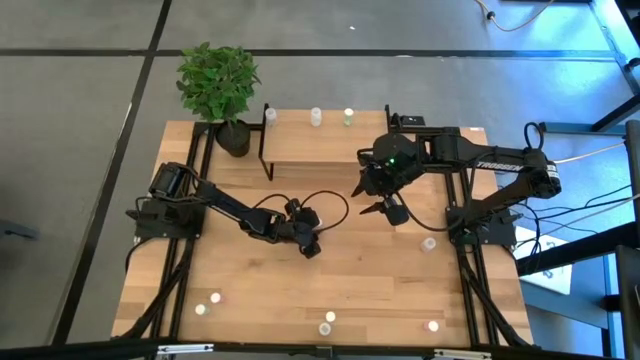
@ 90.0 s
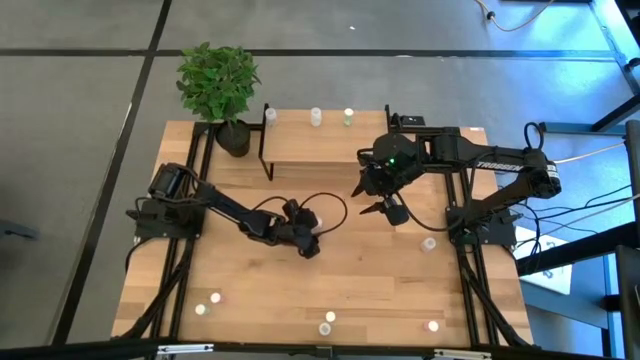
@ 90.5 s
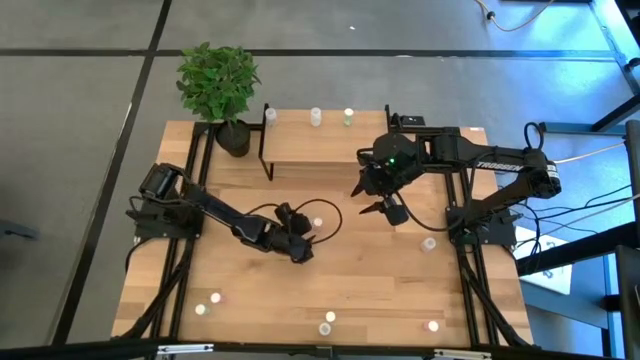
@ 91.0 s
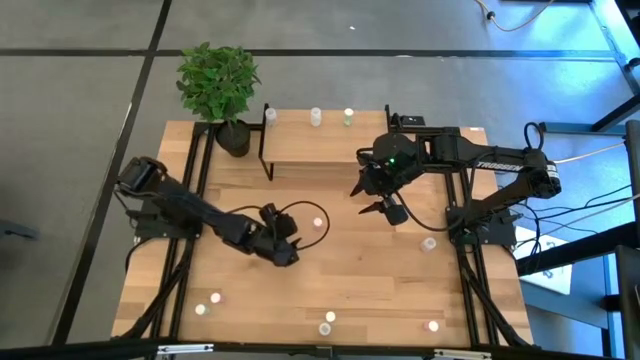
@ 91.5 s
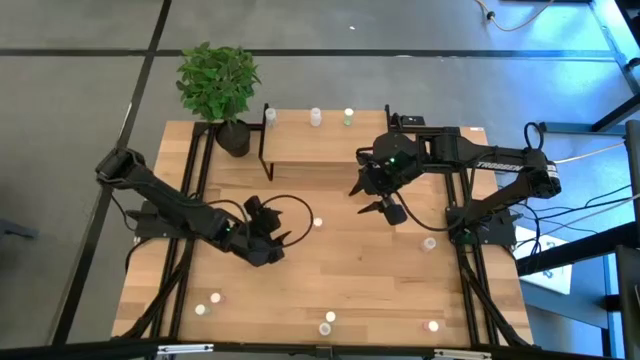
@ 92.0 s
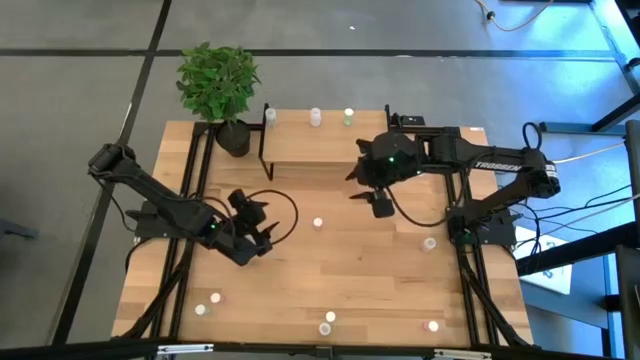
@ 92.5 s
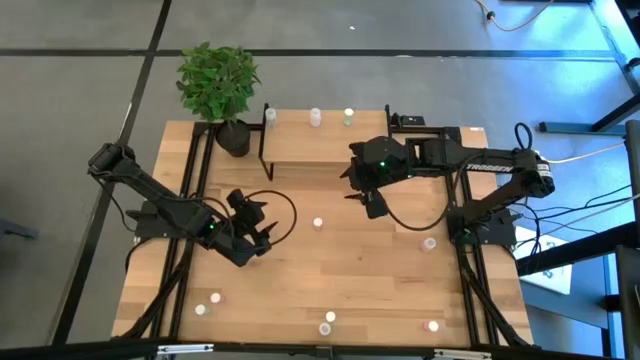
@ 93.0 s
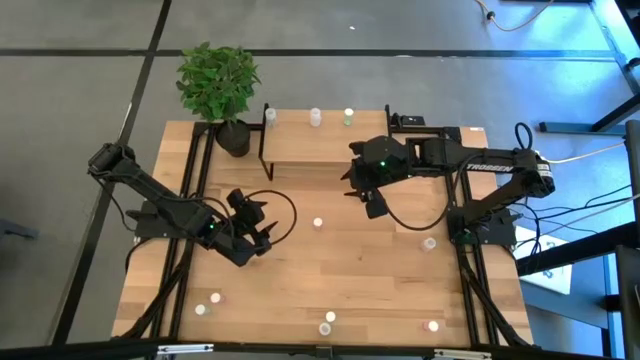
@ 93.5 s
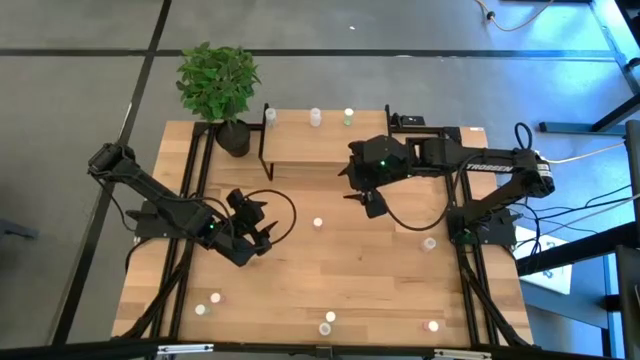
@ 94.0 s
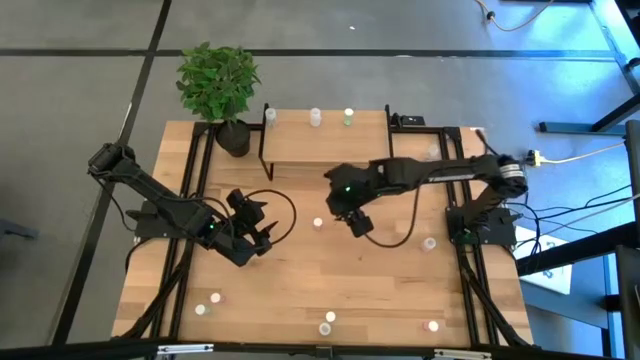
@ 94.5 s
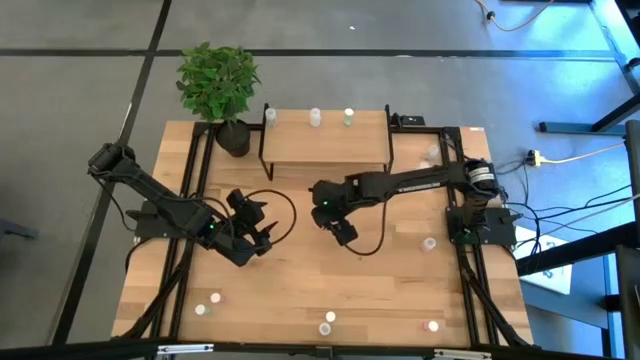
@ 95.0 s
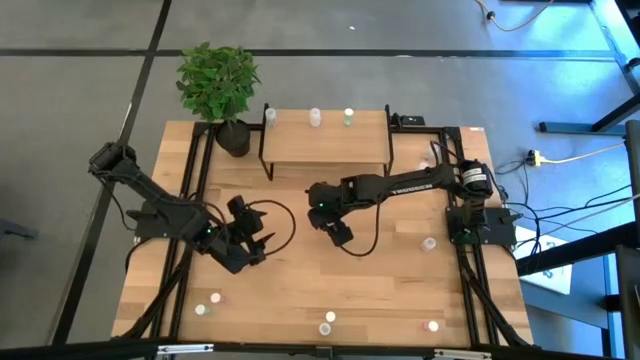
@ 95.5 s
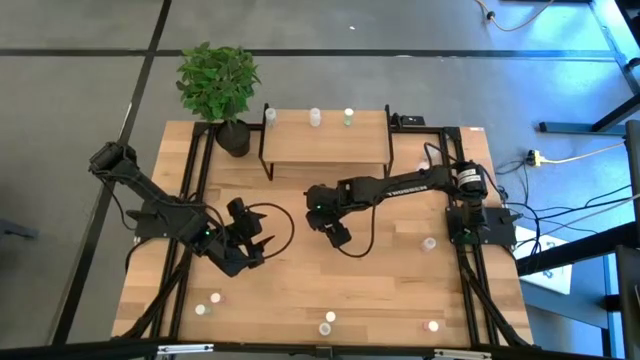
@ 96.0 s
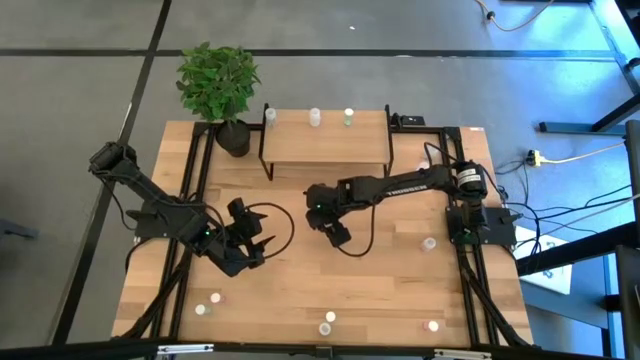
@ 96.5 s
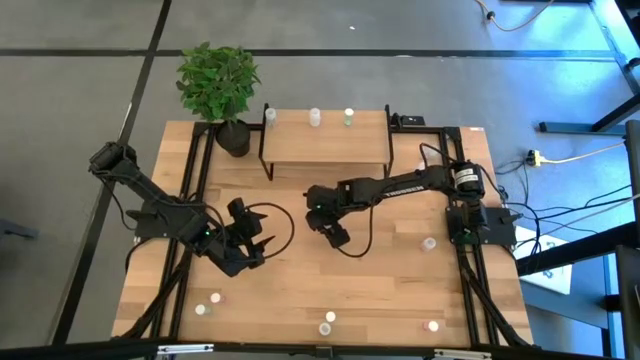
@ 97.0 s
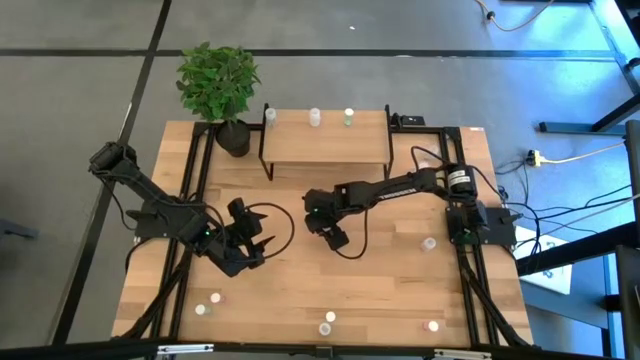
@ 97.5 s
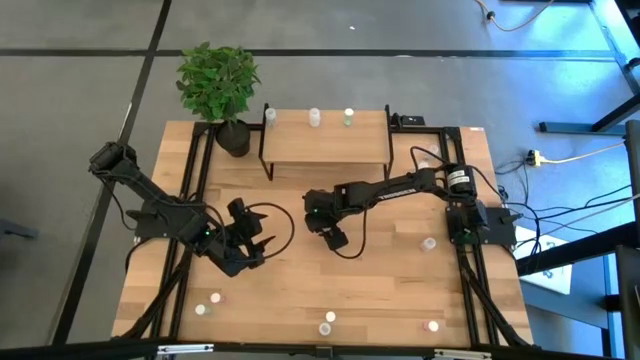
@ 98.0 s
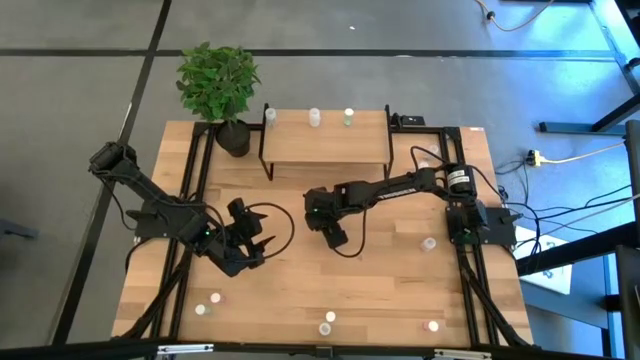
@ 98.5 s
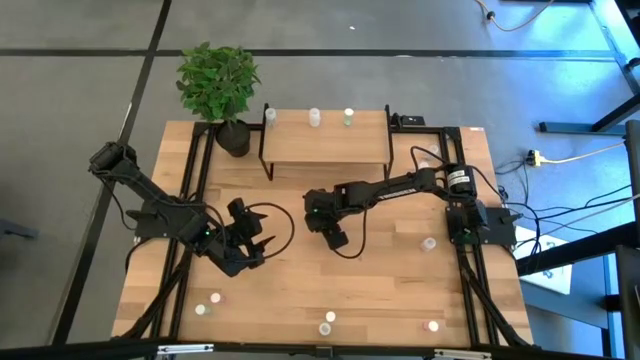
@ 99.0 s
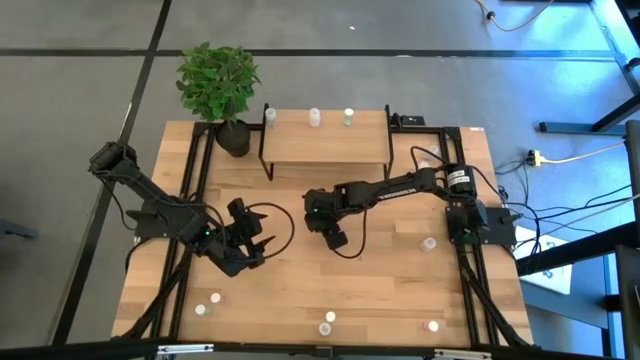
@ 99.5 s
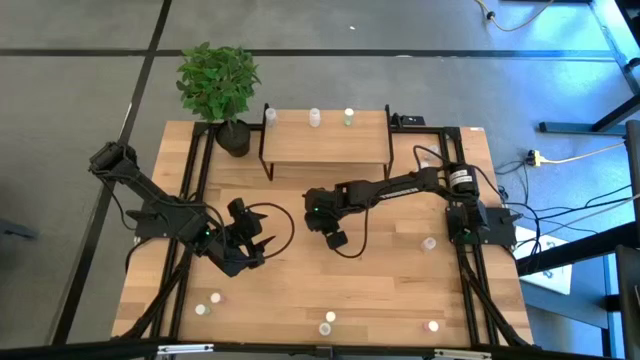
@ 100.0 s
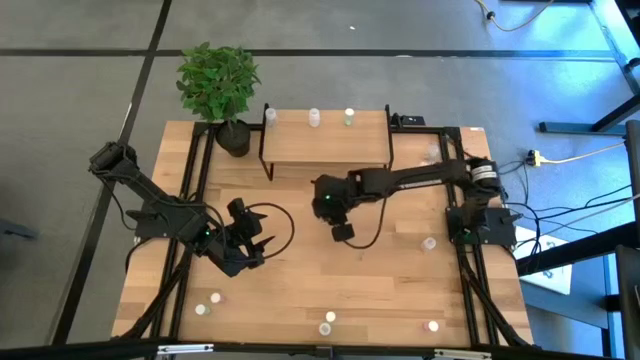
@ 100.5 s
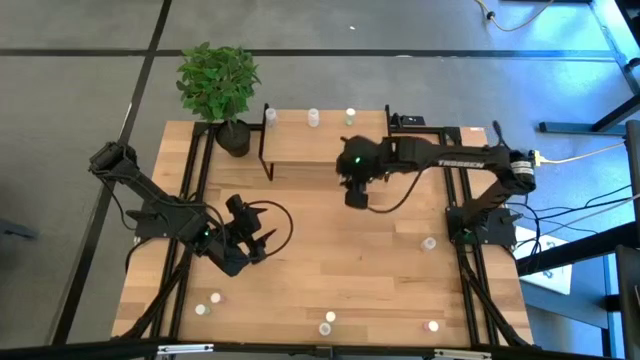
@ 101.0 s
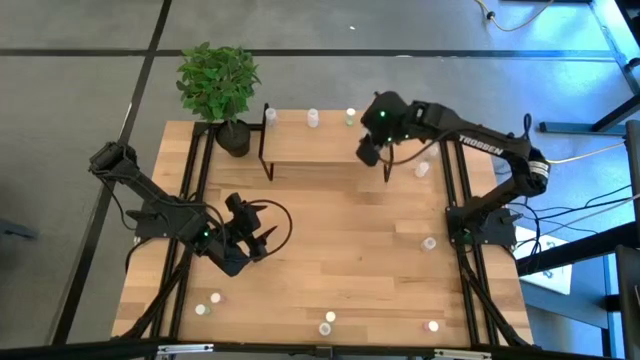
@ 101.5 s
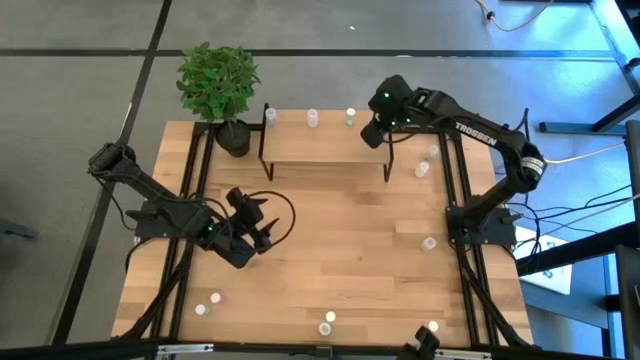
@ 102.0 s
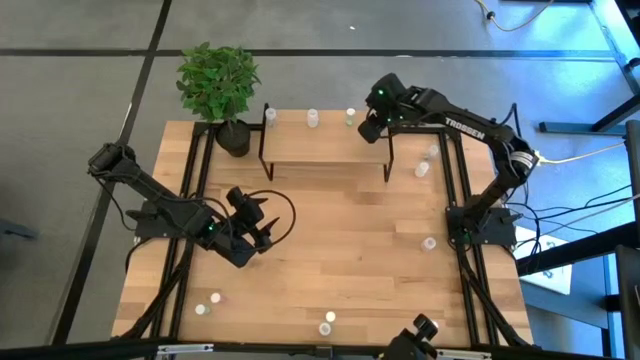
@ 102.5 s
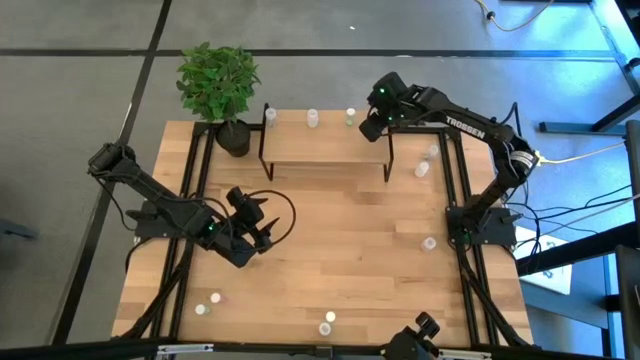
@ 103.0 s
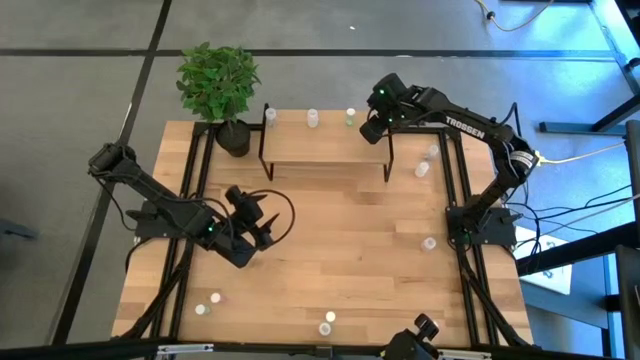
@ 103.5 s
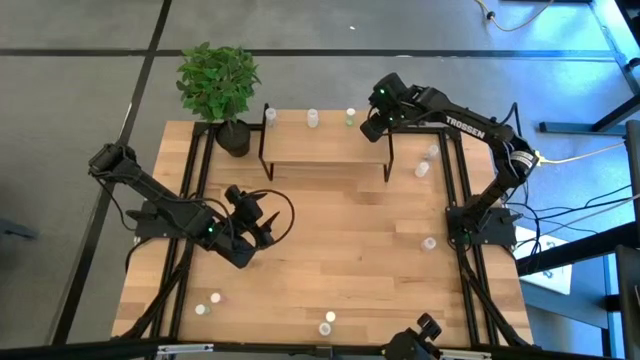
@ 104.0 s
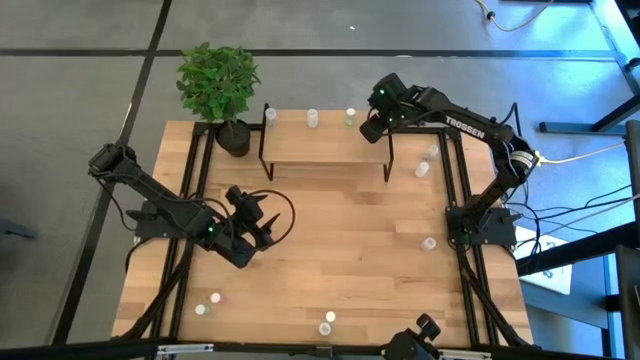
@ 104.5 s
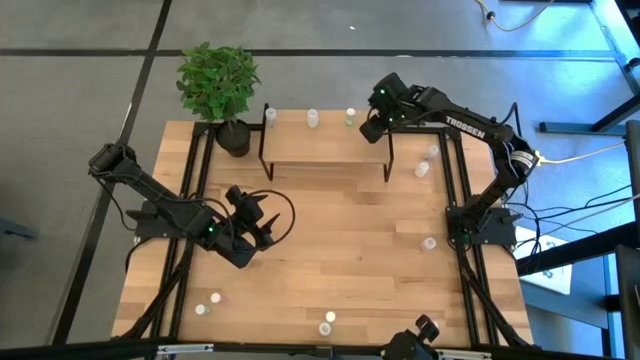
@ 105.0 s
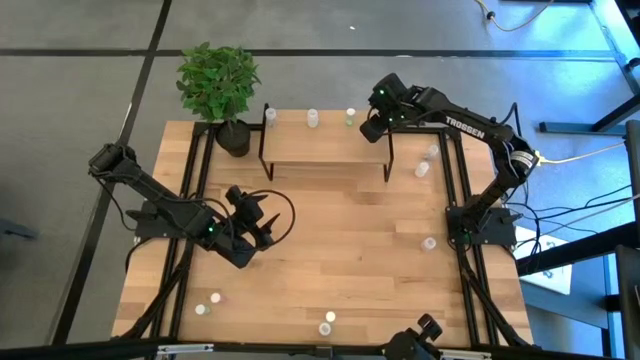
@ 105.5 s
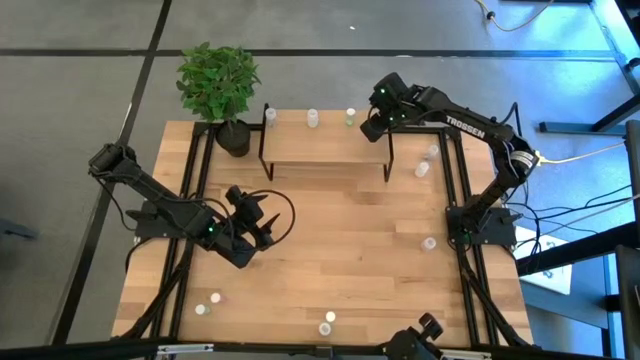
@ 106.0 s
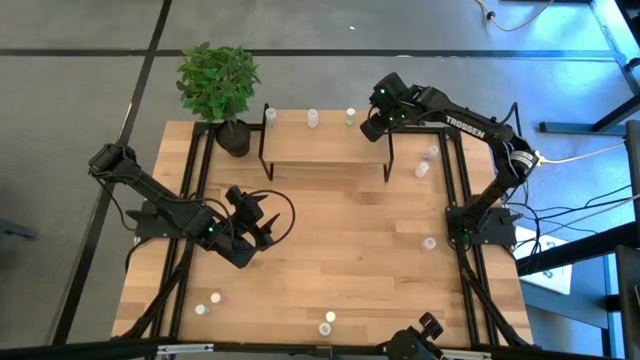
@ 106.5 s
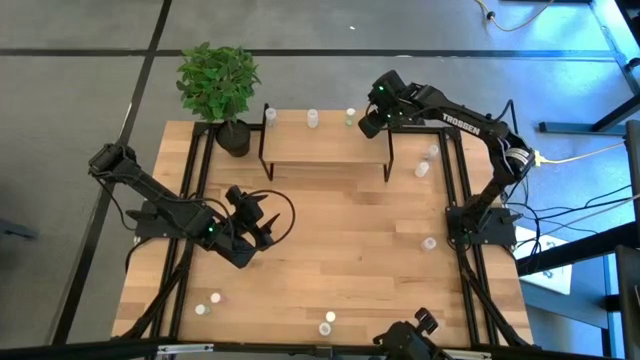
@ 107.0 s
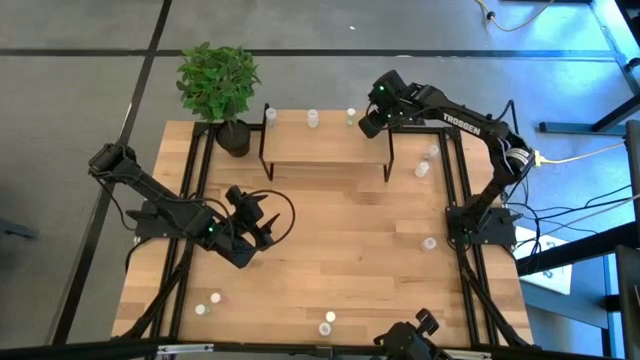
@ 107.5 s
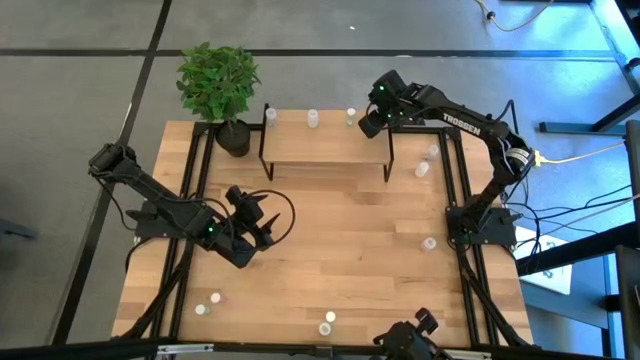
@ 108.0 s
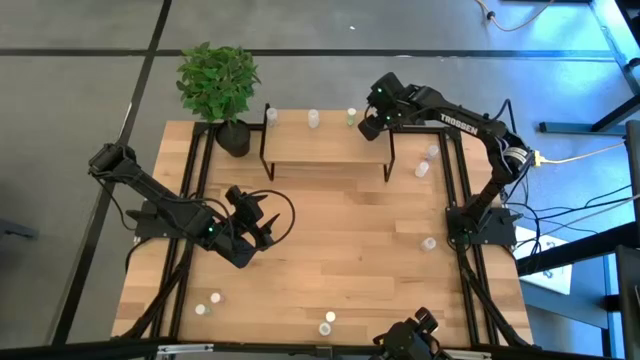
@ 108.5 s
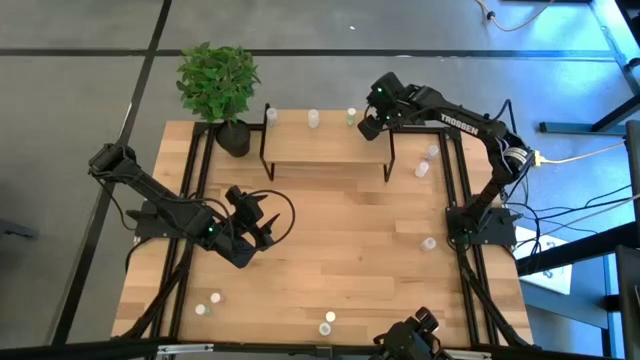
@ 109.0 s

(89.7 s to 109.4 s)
Task: Pick and place medicine bottles onto shelf by color
Put the top left pink pill bottle on the shelf
